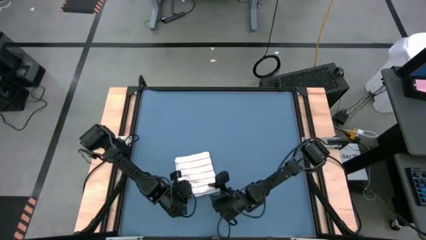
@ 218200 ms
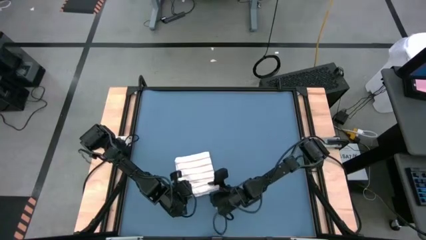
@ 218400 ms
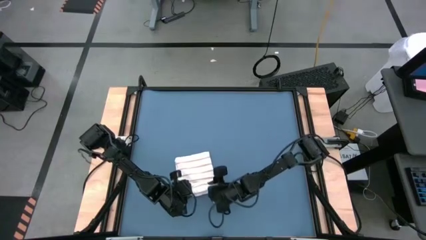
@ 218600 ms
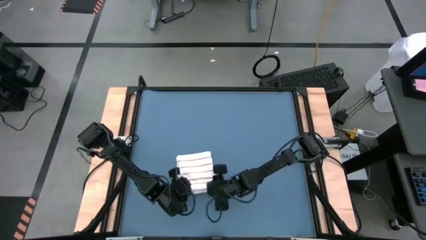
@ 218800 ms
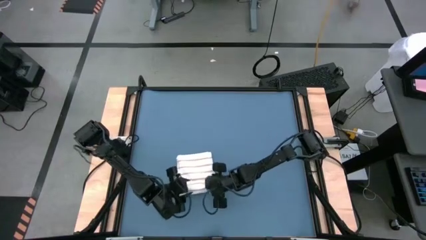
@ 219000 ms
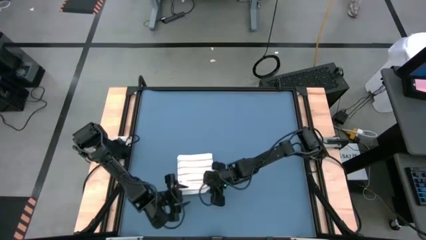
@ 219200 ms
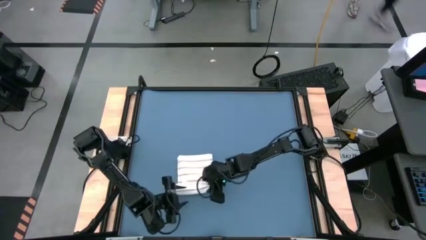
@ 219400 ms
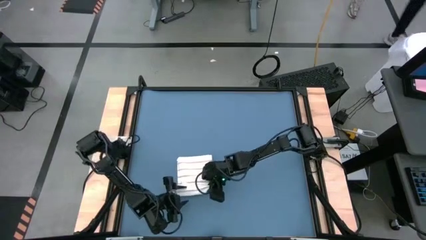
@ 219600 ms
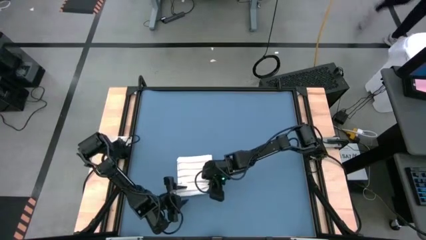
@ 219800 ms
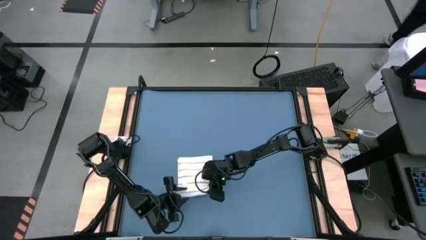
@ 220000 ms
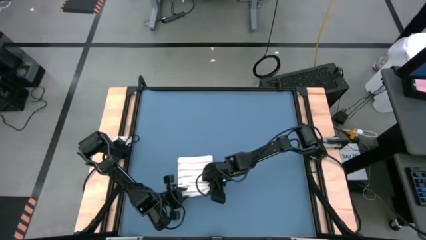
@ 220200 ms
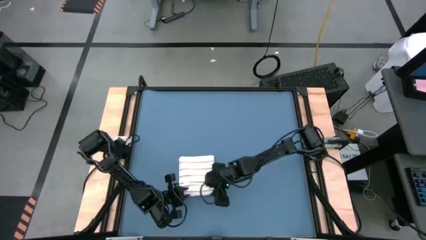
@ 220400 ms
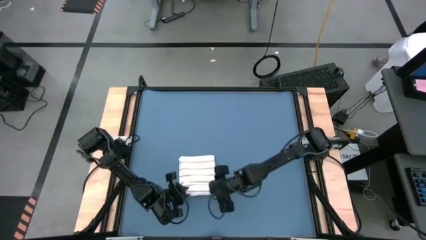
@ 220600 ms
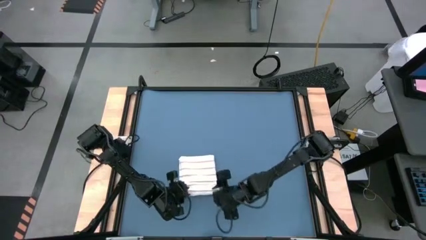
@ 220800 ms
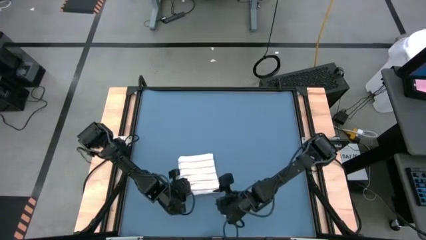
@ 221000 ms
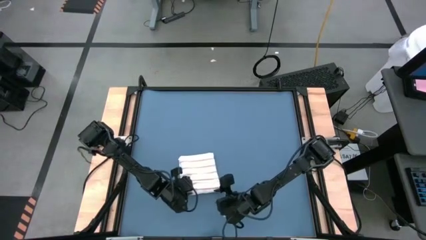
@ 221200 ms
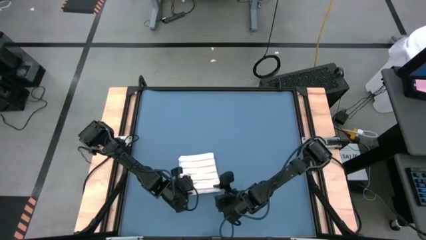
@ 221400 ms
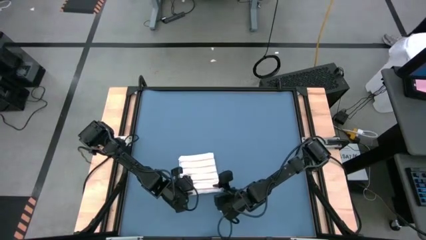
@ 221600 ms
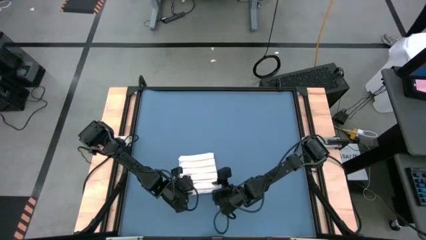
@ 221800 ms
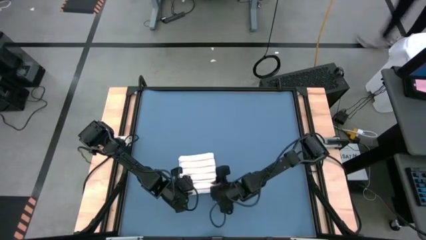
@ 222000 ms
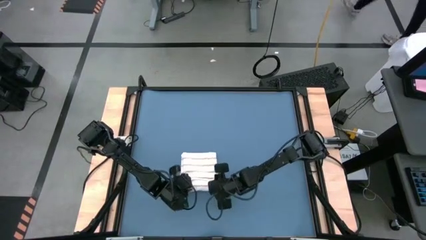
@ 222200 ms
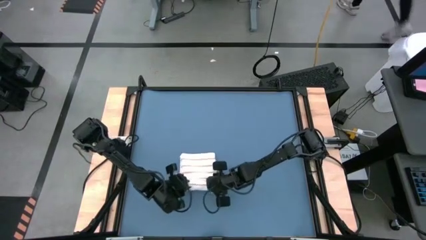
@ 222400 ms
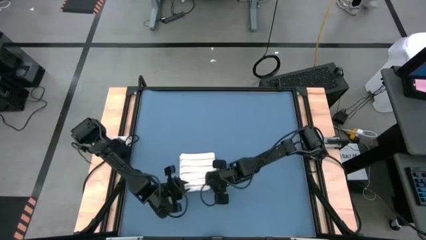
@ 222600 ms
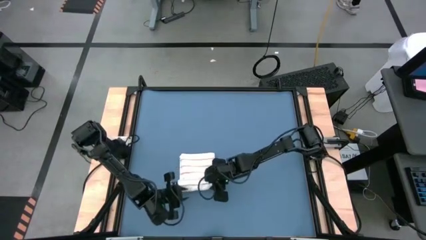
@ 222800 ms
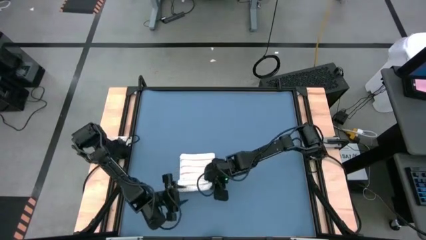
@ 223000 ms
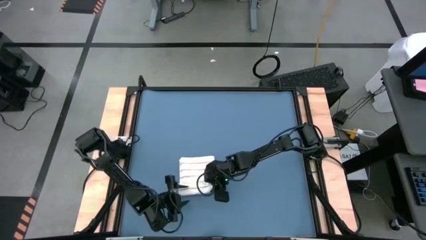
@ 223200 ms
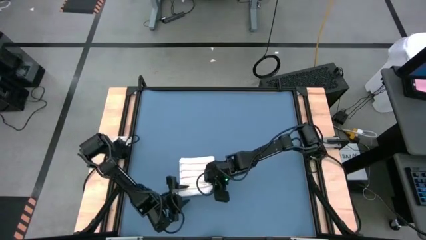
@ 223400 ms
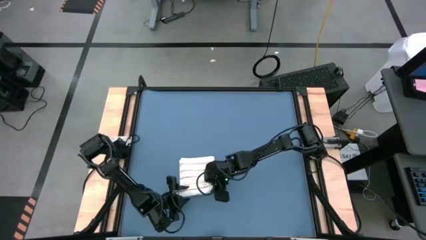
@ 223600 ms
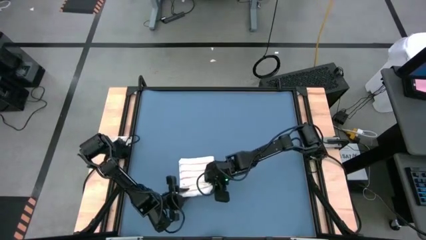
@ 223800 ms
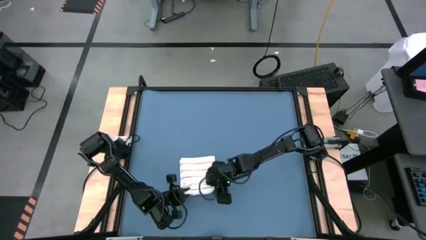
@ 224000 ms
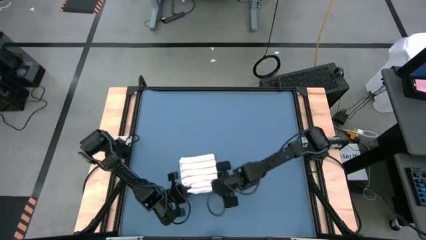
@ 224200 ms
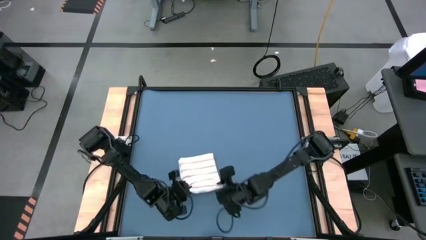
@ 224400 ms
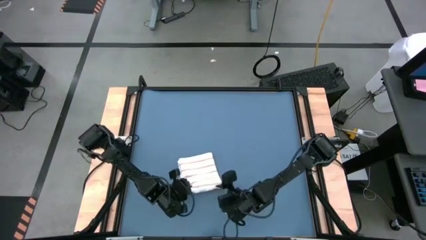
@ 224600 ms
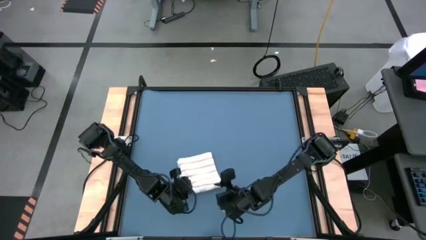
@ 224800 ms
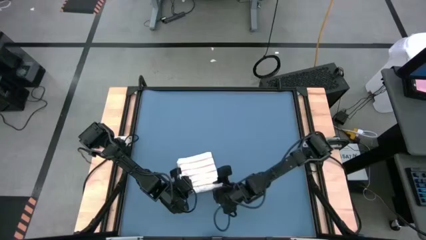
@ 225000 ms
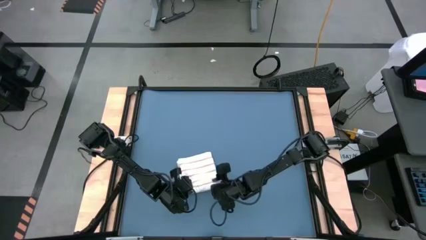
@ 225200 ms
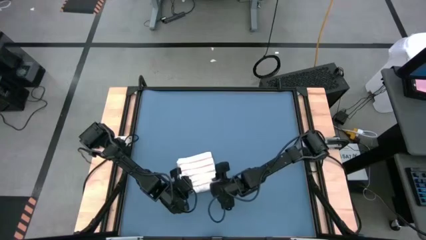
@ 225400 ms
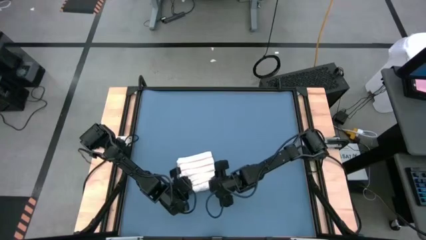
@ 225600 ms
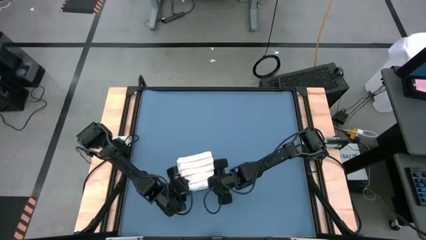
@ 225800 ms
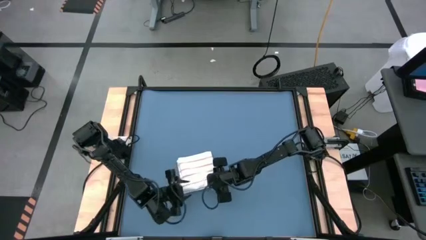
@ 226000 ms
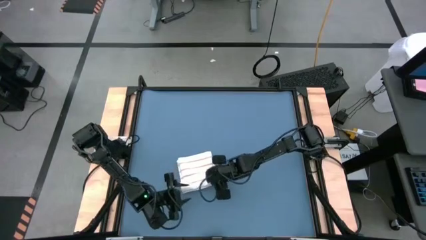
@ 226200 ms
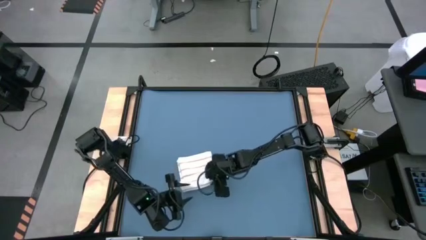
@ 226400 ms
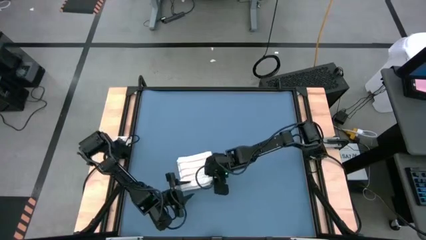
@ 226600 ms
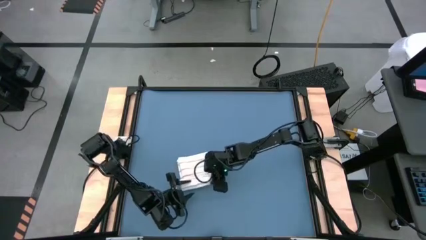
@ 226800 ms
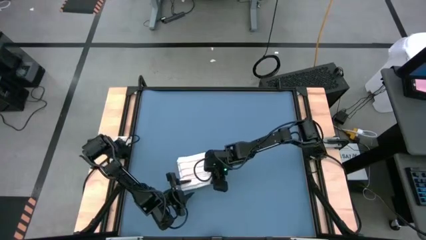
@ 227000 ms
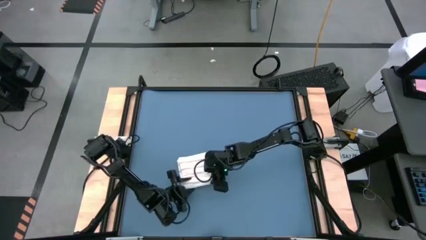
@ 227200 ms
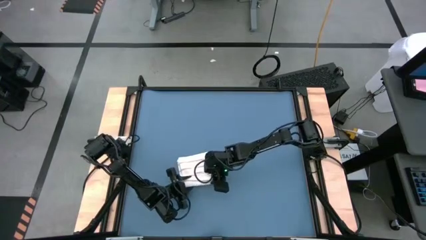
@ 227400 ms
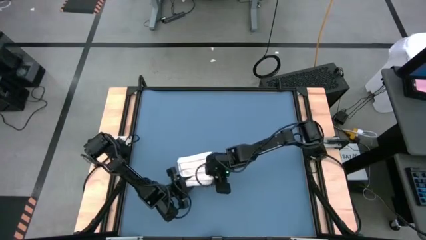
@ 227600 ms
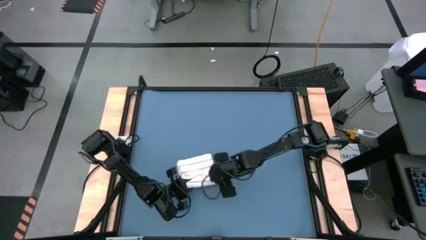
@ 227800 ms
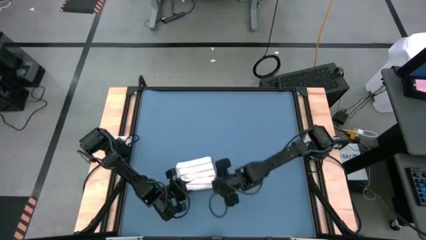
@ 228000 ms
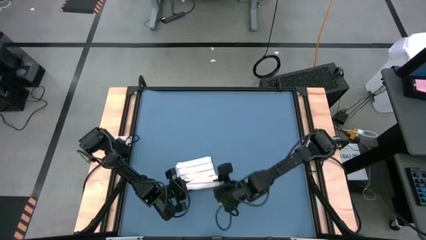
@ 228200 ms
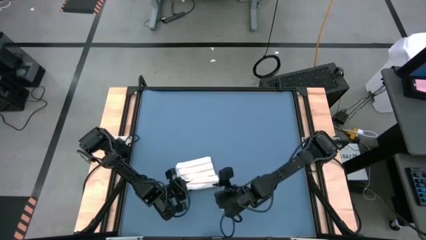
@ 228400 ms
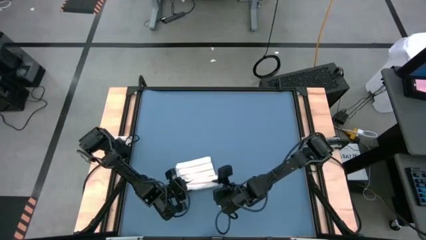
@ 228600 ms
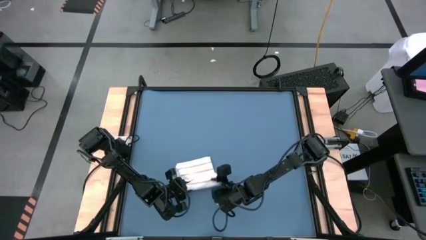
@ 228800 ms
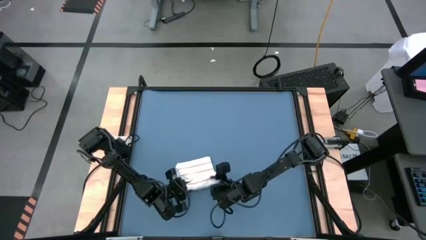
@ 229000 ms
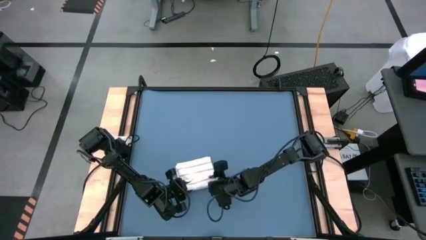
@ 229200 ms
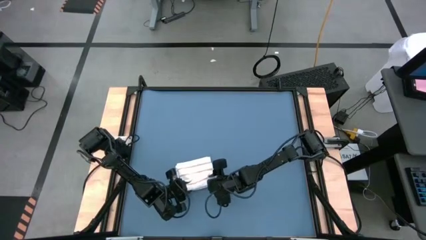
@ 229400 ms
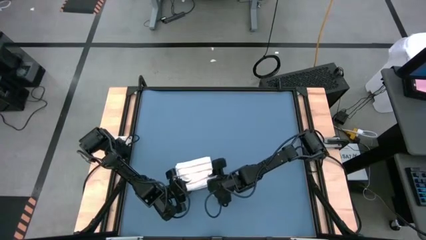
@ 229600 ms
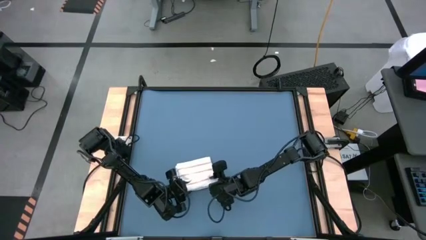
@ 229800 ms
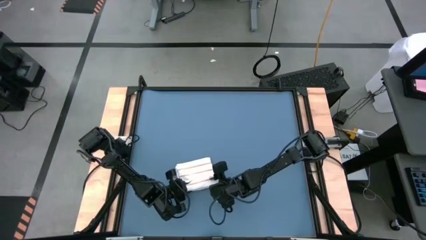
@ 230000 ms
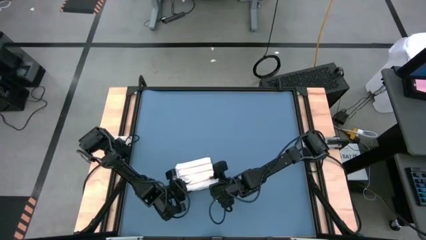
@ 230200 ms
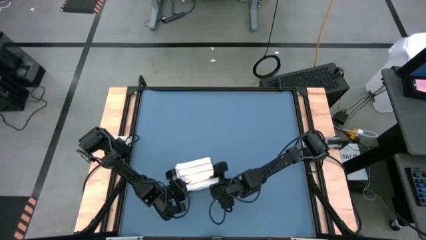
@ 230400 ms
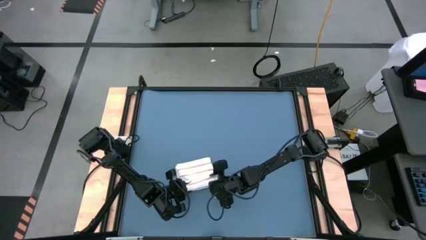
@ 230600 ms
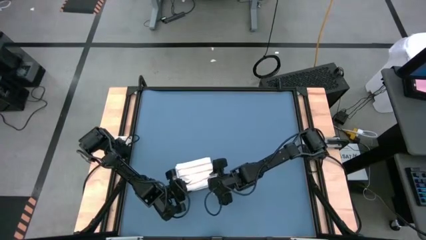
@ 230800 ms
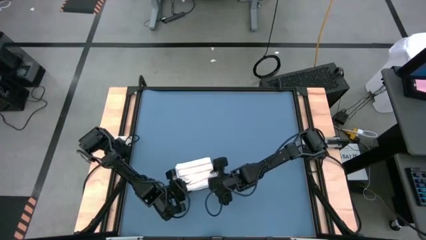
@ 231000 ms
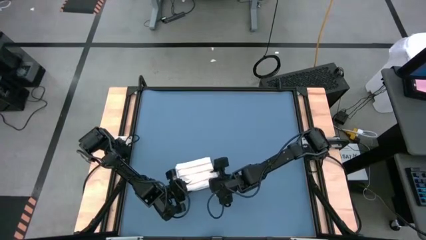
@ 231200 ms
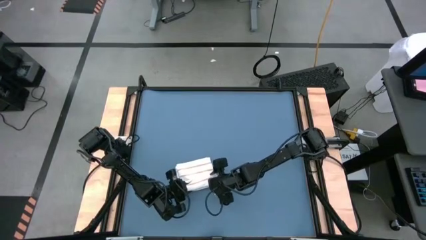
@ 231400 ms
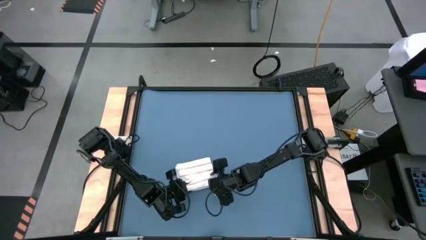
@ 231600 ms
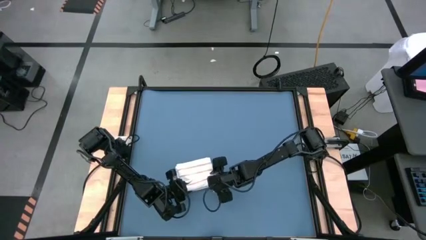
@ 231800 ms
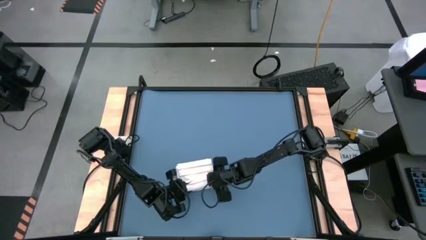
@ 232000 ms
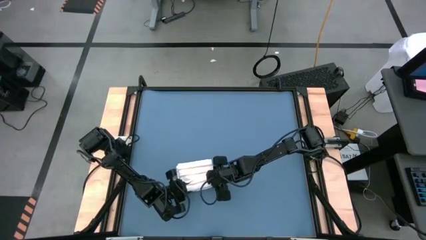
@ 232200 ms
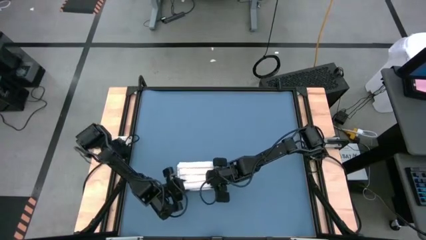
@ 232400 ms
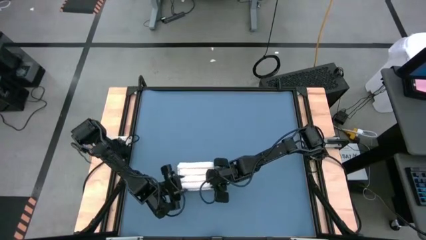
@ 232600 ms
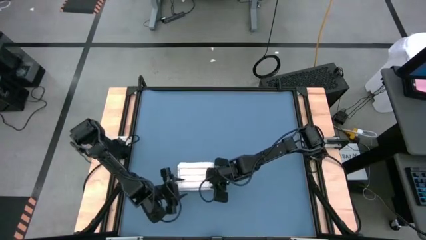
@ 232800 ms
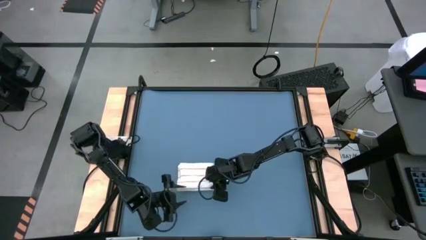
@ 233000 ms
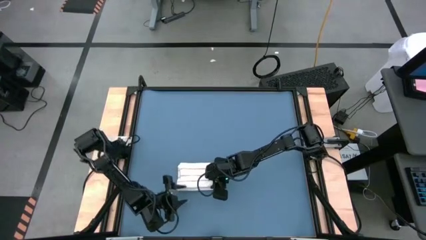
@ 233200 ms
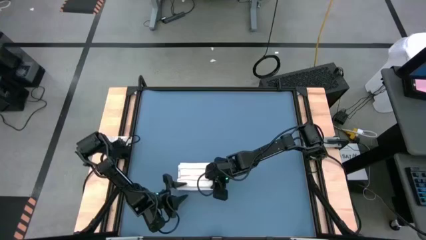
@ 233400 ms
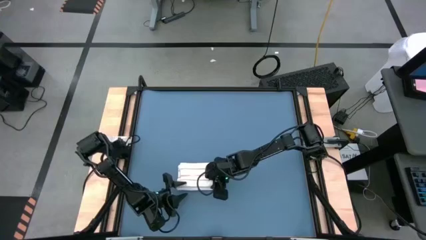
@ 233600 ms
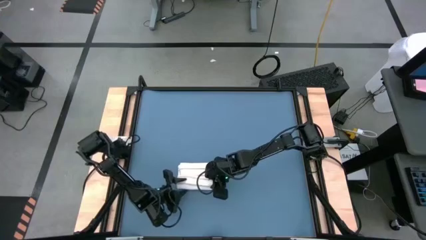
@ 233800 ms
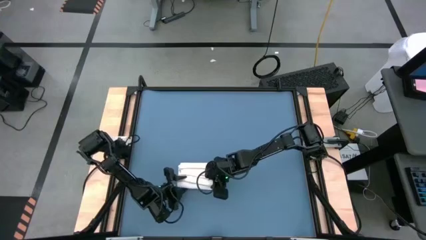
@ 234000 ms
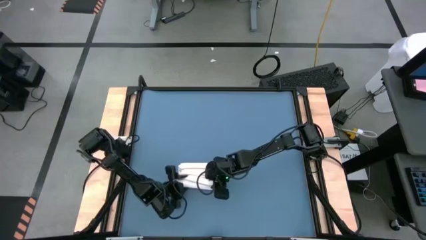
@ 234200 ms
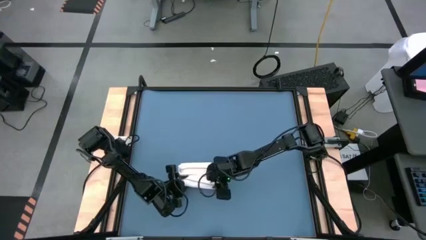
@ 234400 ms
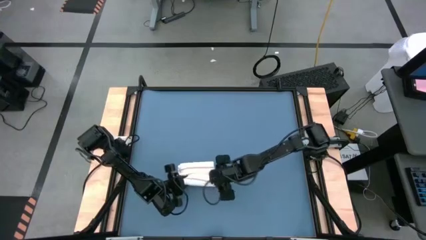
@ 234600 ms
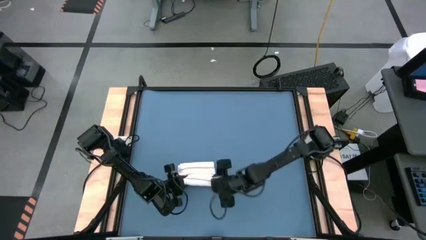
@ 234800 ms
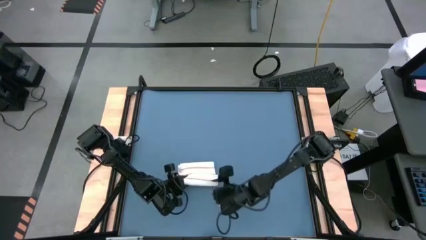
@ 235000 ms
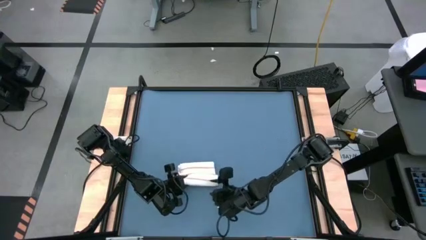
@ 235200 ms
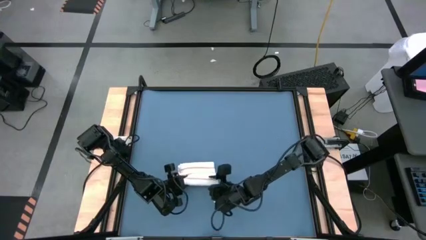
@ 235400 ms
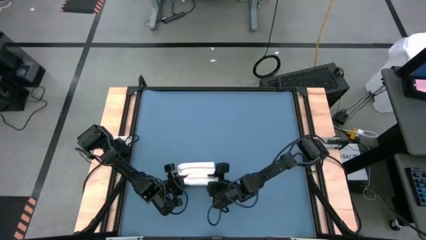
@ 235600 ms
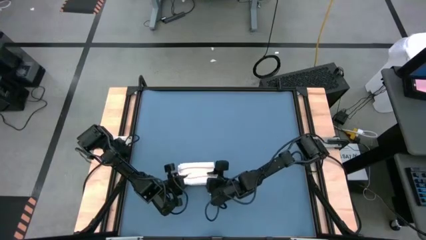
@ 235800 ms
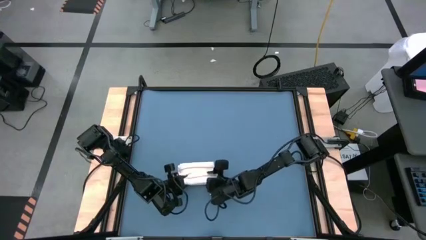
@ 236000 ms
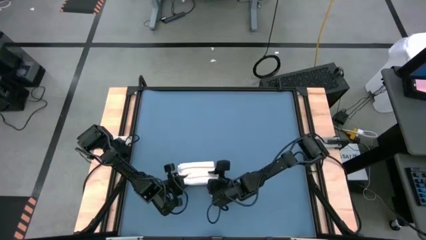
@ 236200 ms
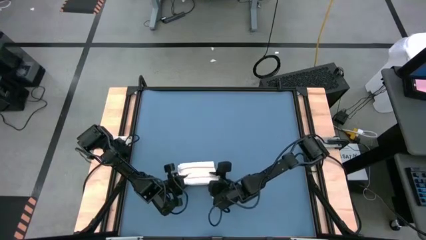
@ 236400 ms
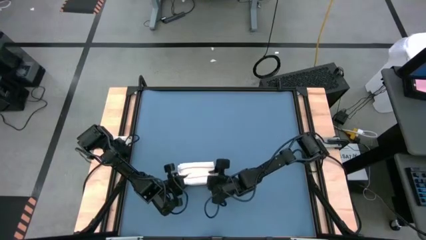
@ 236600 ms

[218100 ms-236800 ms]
Task: Roll towel
Roll the white towel
